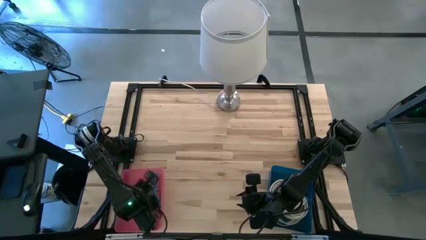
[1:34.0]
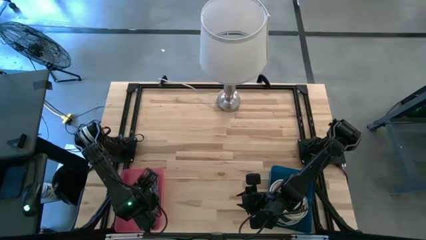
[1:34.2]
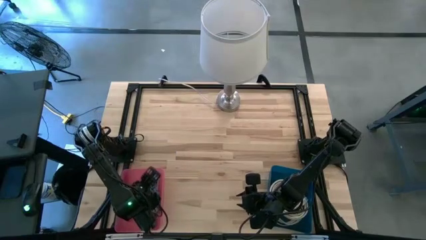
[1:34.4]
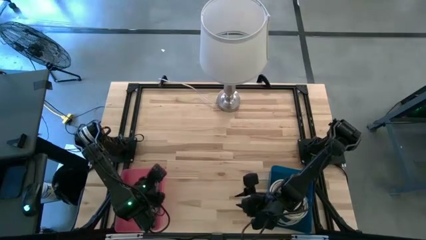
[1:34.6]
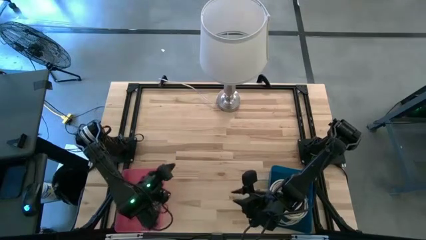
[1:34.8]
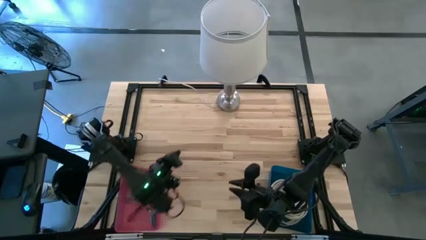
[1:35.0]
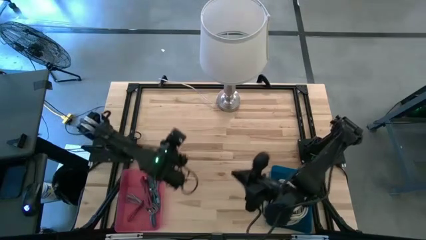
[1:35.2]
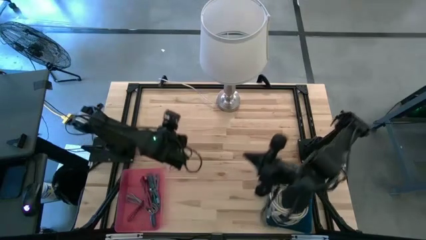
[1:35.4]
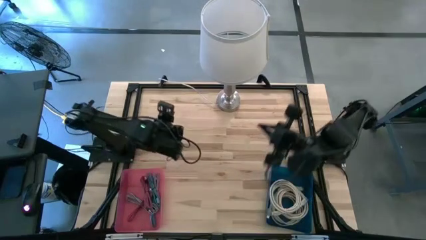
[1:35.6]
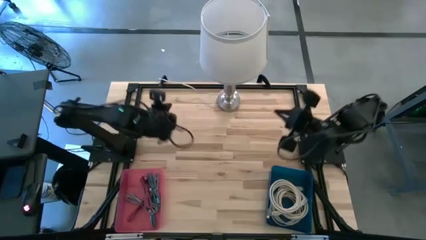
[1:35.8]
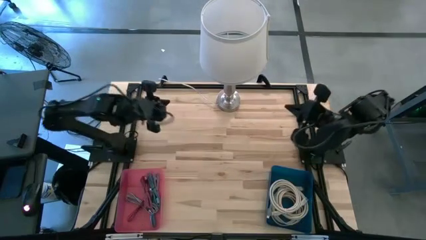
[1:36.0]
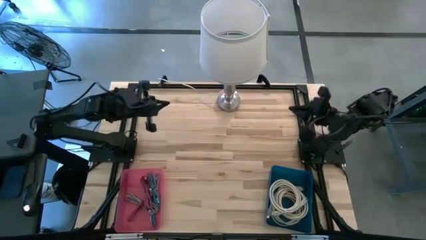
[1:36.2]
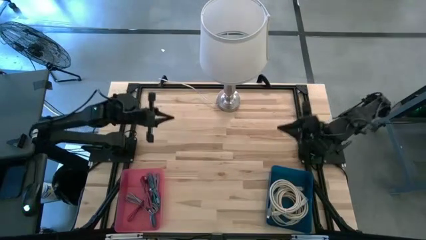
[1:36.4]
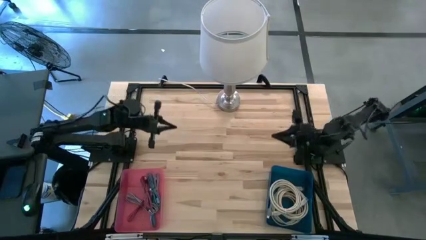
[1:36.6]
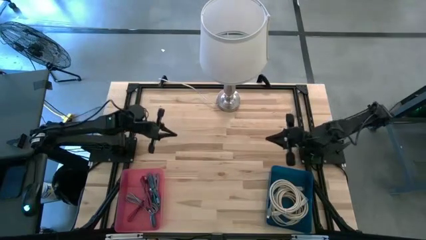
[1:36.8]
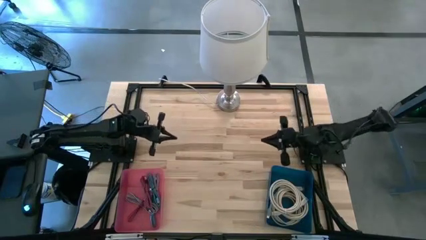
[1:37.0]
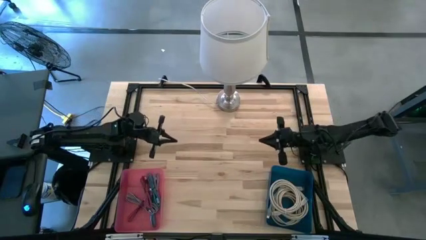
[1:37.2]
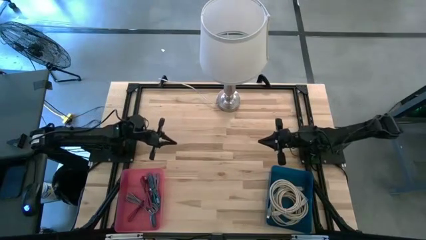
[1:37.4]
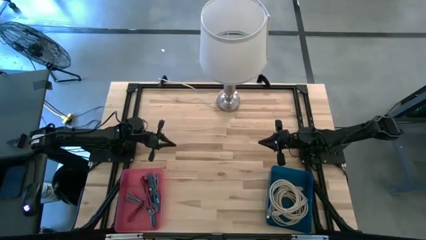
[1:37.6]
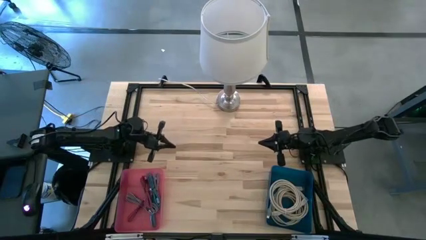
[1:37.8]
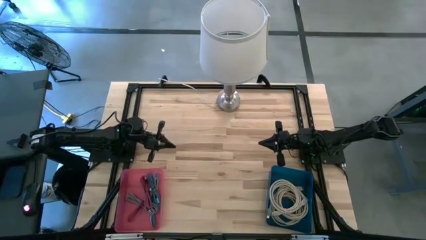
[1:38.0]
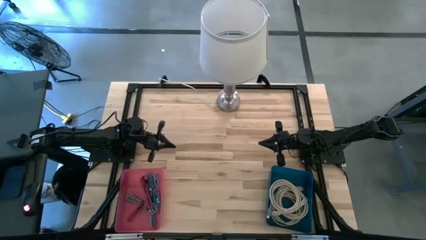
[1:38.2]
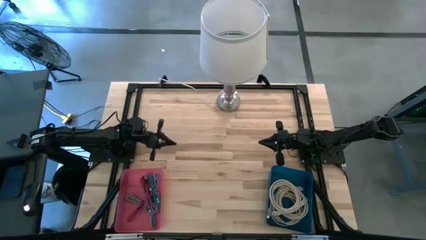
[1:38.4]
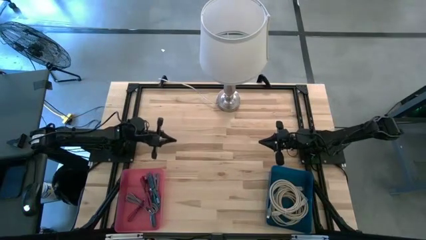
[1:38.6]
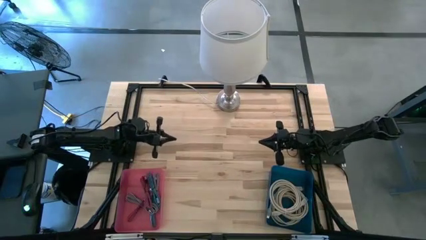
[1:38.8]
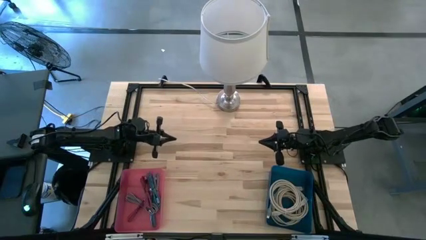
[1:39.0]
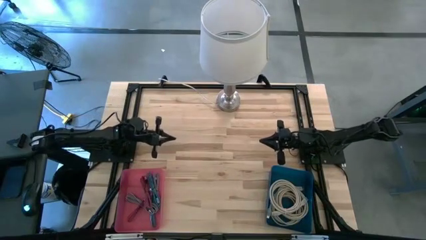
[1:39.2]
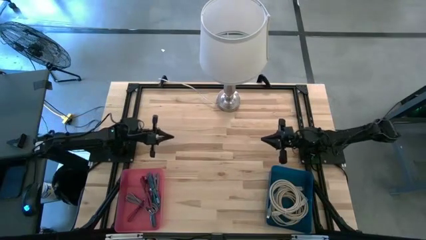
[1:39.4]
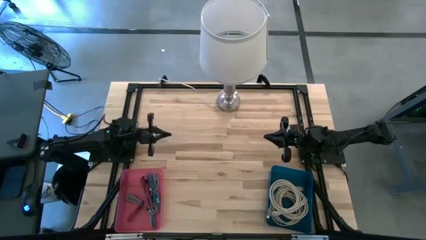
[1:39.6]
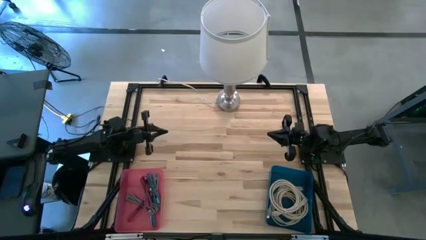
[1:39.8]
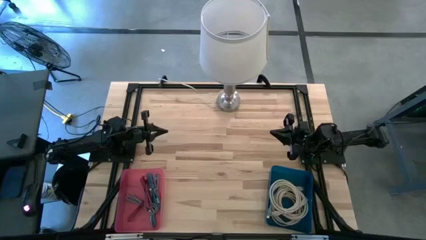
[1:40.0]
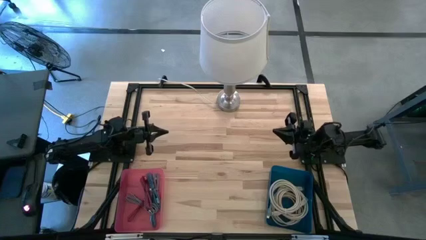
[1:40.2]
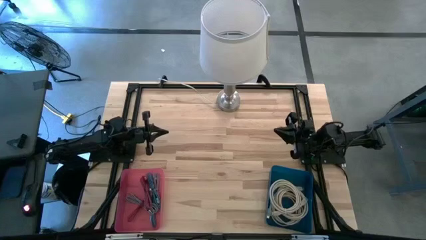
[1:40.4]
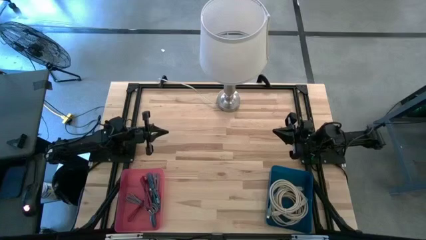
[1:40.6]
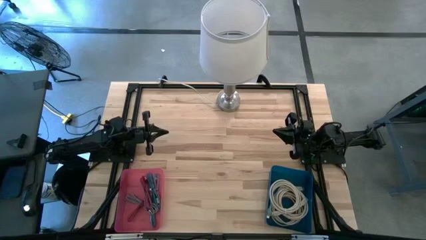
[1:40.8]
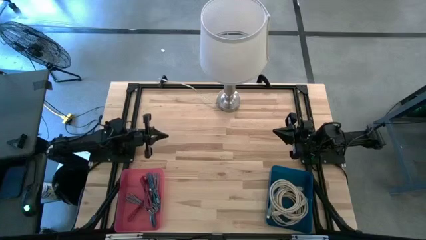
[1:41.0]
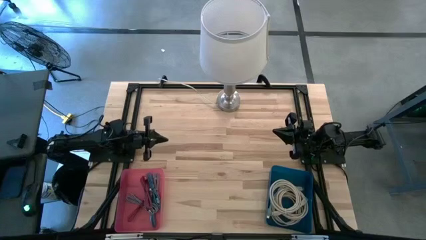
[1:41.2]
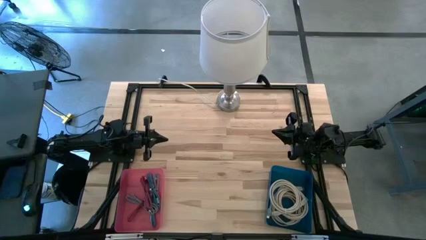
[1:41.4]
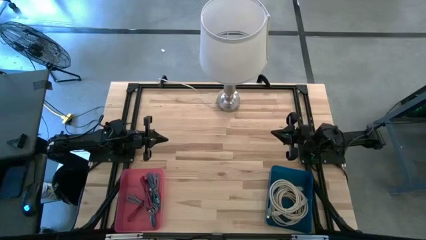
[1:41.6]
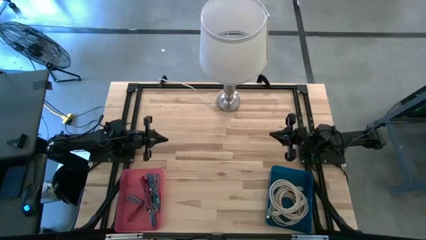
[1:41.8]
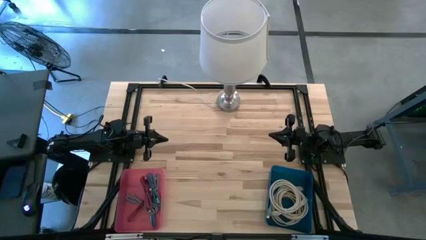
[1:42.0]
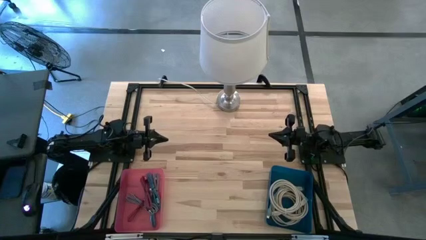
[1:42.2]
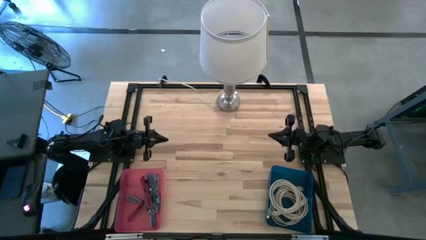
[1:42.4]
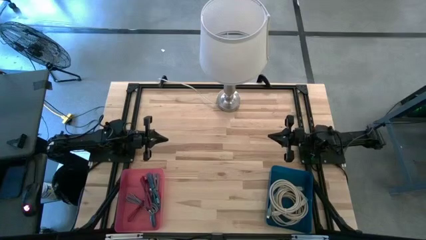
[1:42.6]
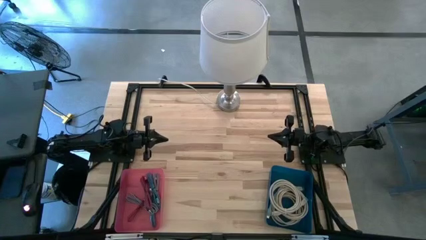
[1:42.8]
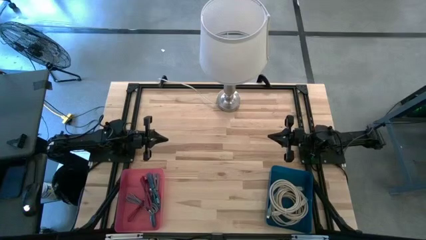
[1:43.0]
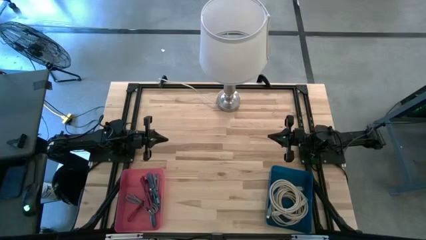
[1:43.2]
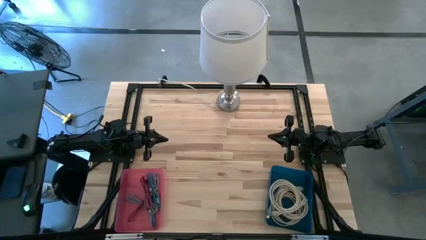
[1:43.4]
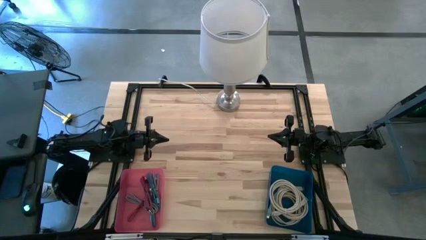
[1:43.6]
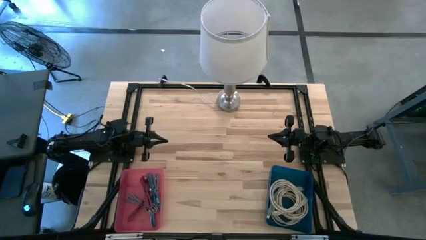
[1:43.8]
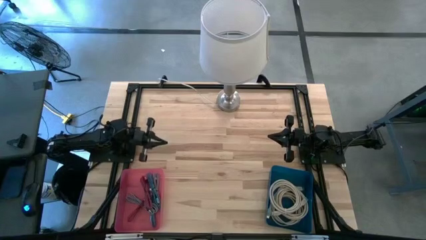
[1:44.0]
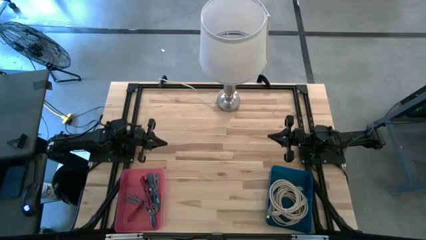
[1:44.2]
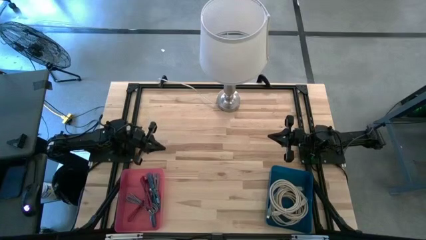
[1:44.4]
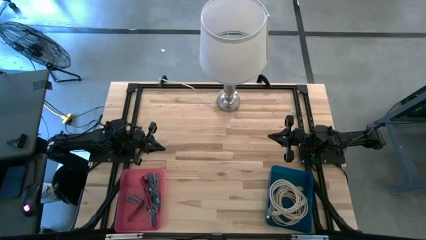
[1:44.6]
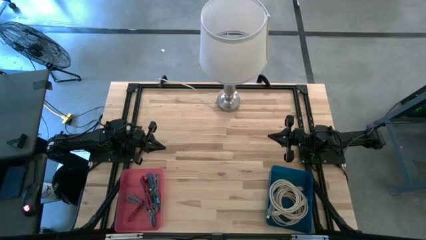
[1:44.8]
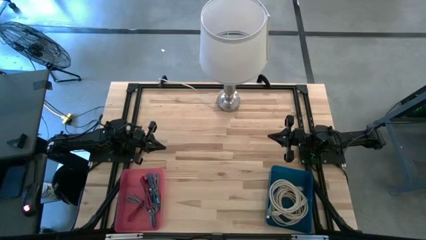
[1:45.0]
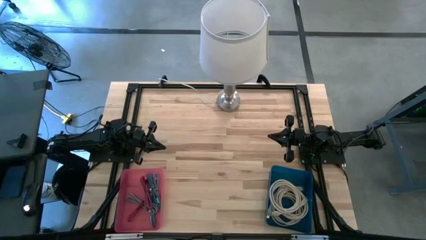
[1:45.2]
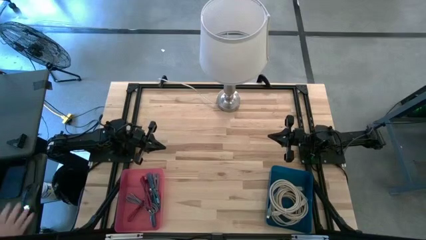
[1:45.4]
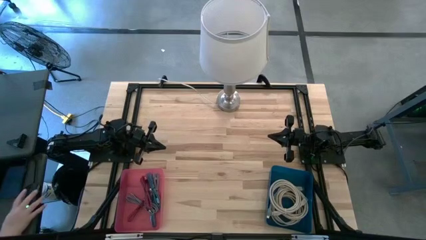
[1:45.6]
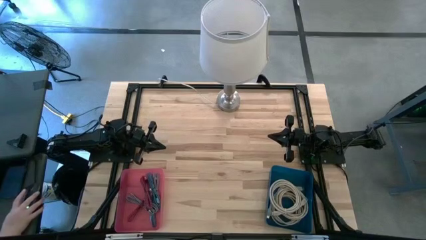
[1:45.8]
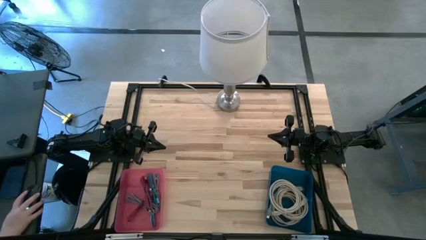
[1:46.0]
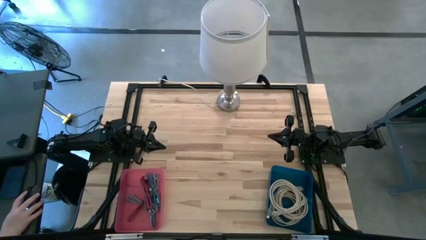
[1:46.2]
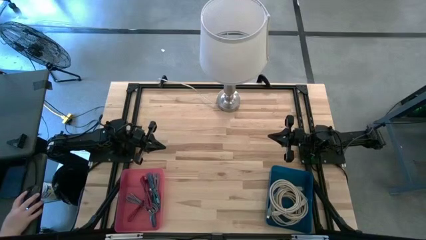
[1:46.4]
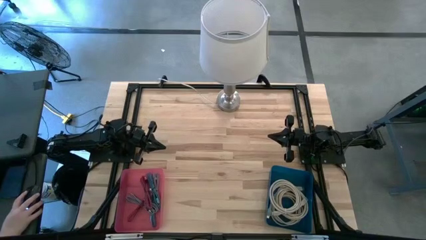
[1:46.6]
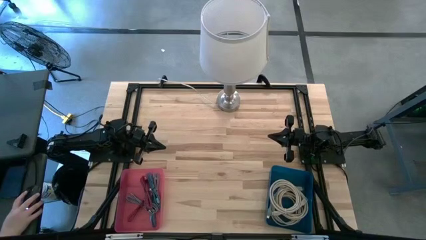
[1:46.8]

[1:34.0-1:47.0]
Task: Pick & Place USB Port
Return to Home Position

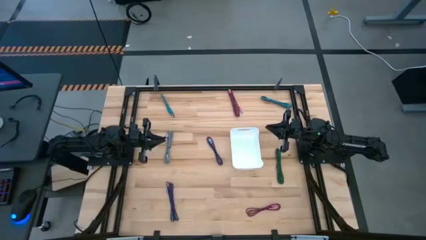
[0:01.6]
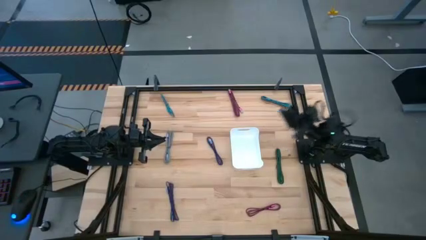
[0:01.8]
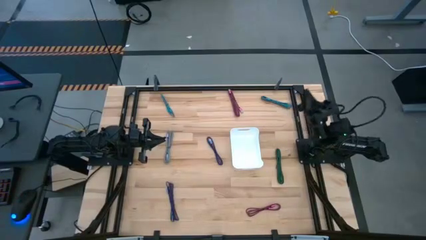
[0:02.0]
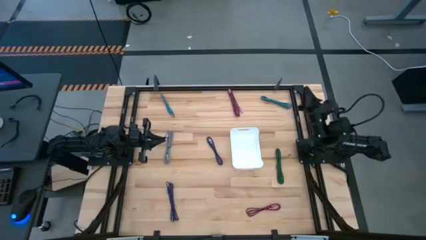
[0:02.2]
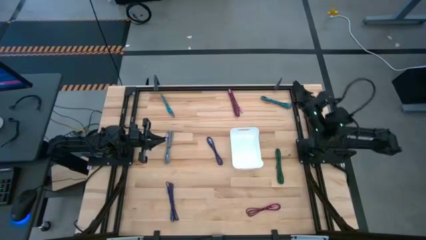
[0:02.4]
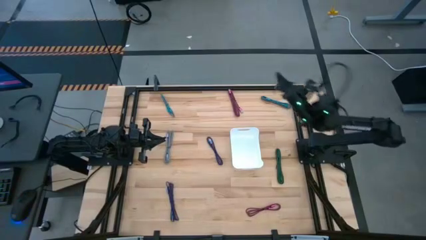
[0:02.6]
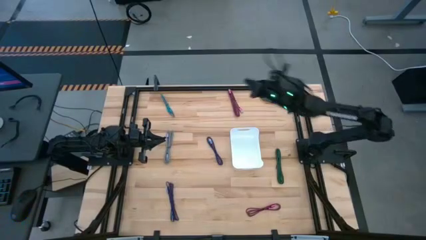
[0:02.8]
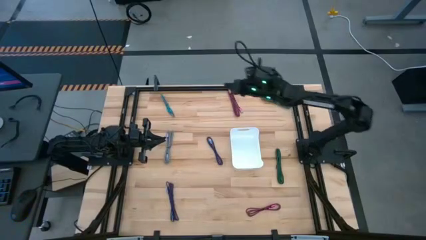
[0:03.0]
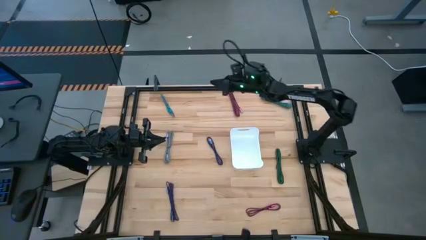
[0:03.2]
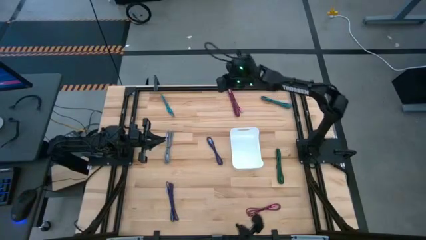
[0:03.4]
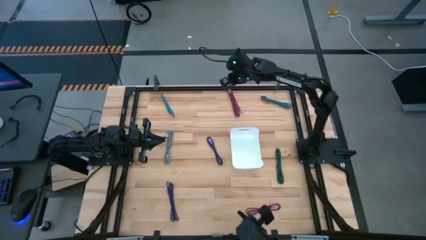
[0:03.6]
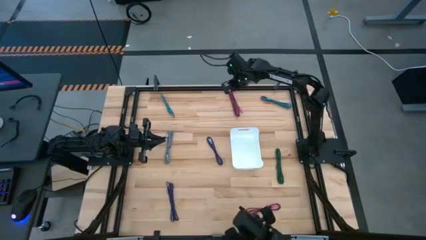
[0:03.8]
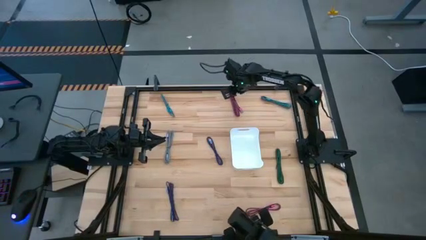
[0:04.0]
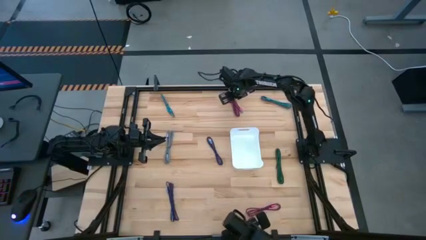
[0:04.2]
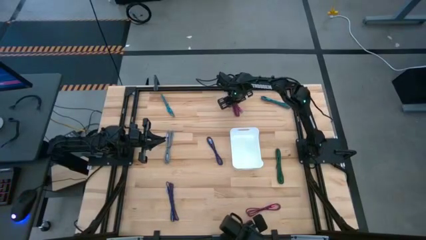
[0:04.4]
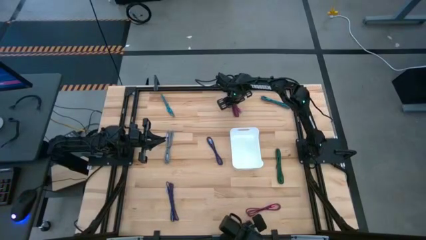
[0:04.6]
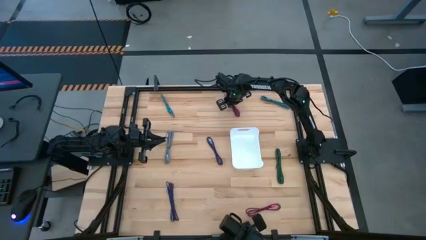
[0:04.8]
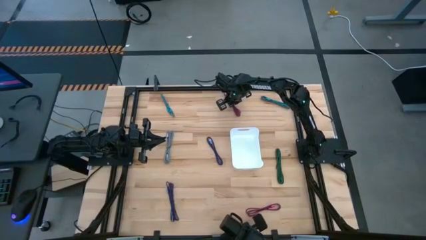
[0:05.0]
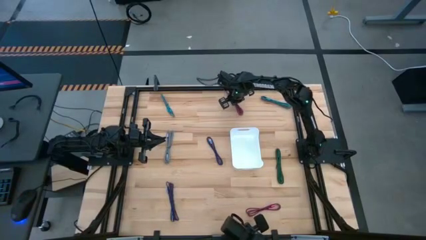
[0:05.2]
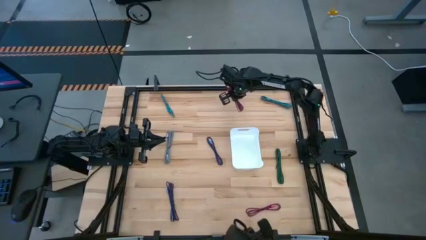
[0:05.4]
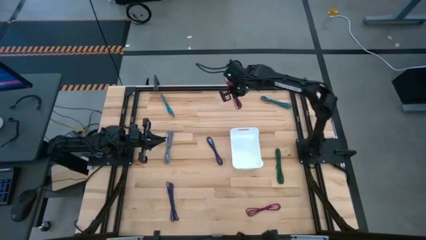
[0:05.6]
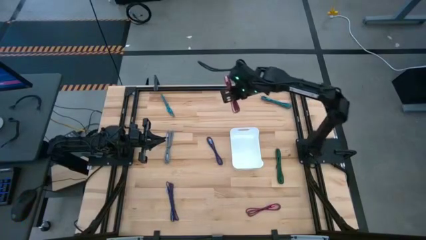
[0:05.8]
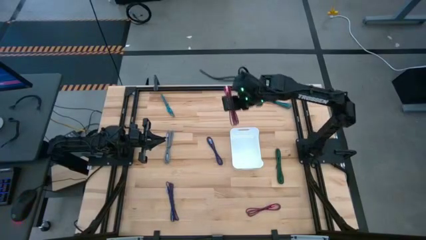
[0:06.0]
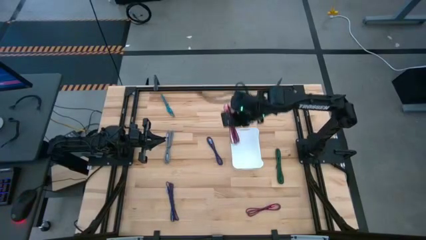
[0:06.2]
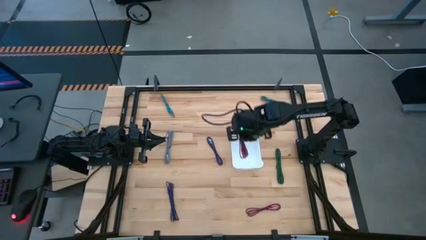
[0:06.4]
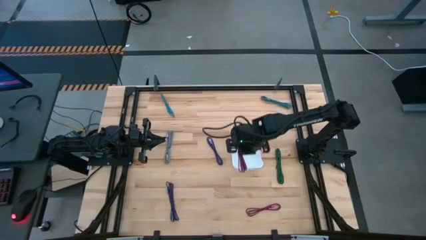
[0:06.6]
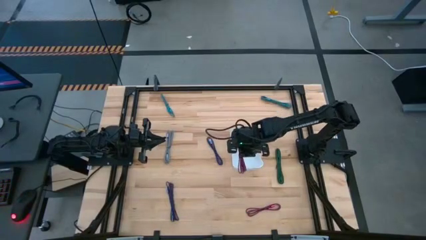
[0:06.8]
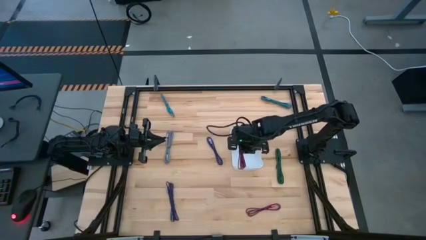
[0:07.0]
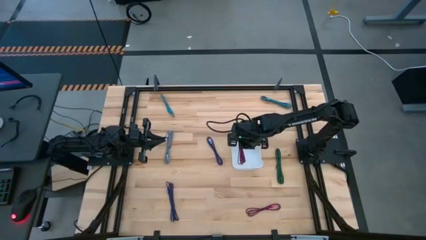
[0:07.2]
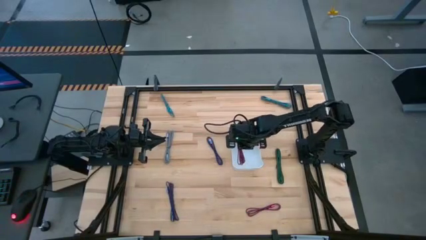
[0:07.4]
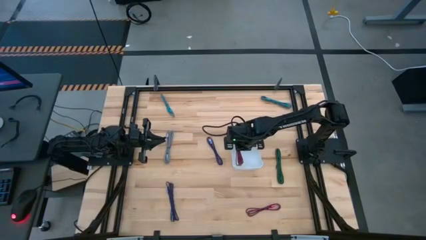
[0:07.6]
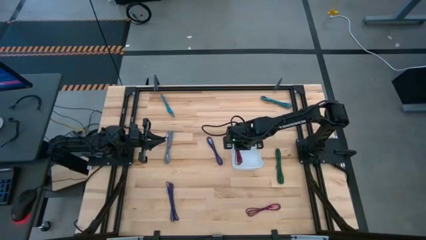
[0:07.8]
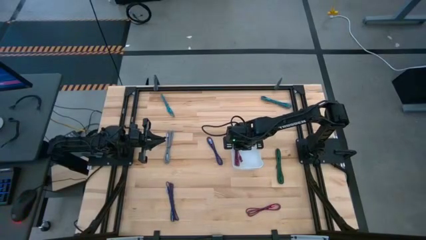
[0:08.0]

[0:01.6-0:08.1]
Task: Pick and place USB-C Cables
Put the top pink charger cable into the white bin
